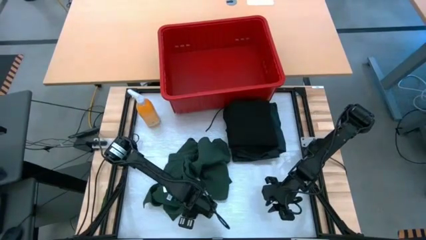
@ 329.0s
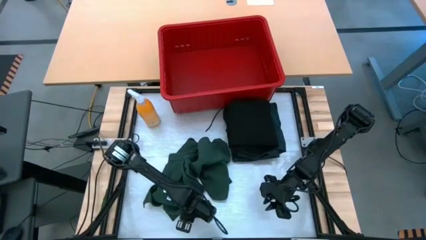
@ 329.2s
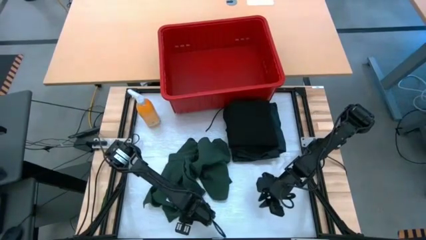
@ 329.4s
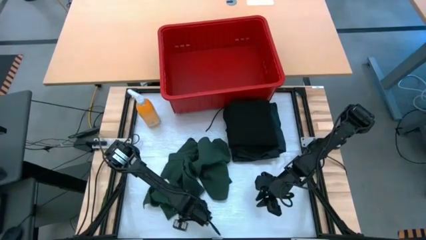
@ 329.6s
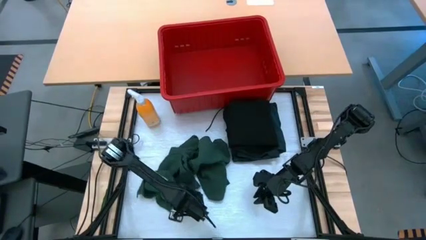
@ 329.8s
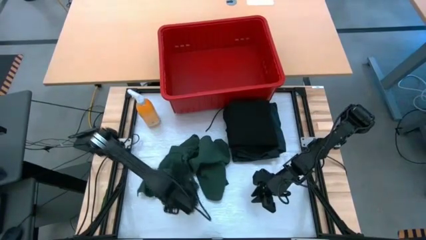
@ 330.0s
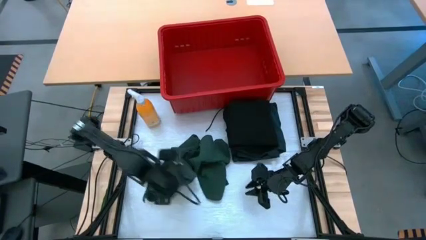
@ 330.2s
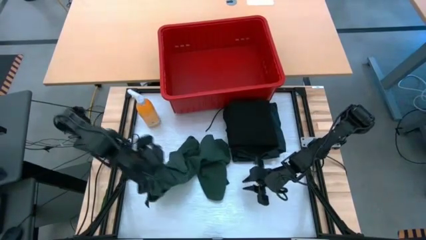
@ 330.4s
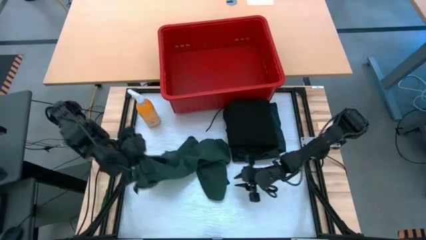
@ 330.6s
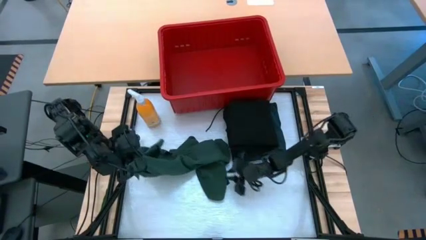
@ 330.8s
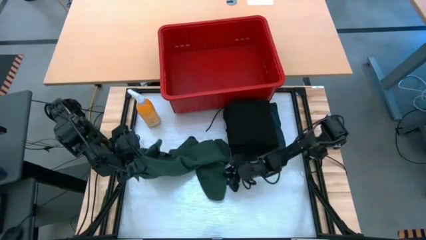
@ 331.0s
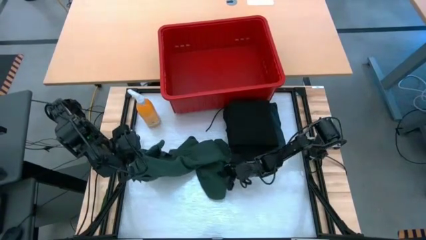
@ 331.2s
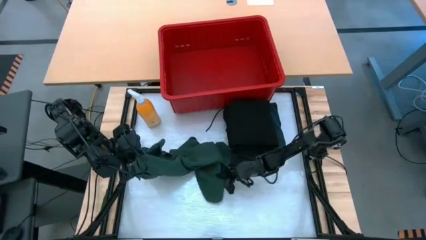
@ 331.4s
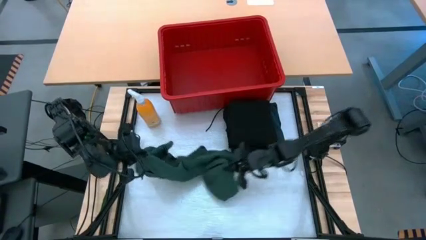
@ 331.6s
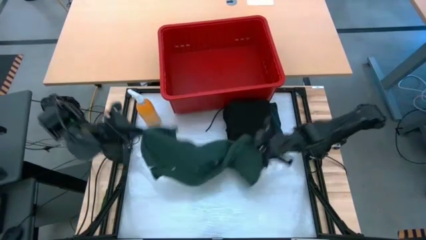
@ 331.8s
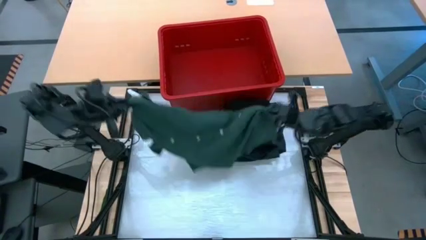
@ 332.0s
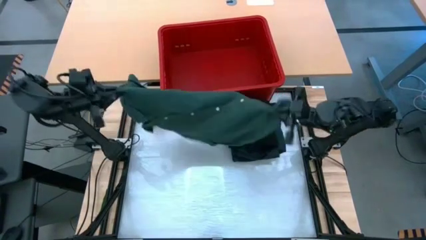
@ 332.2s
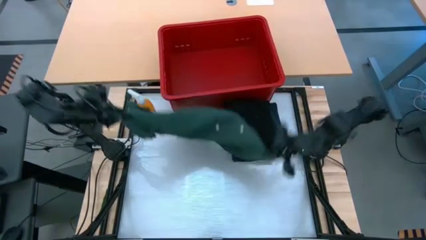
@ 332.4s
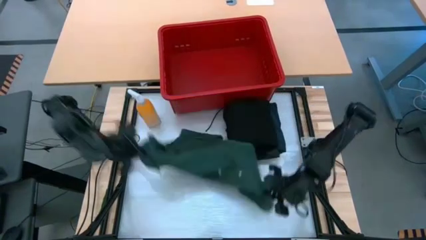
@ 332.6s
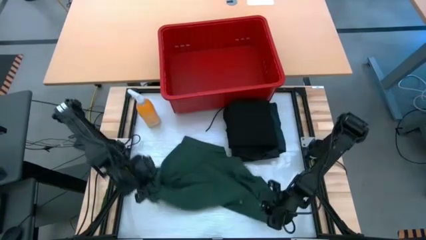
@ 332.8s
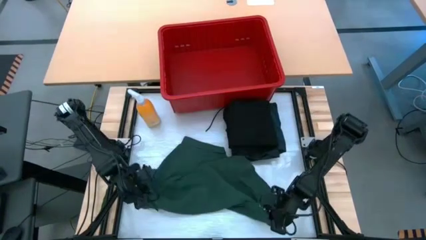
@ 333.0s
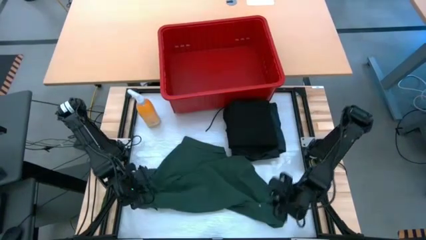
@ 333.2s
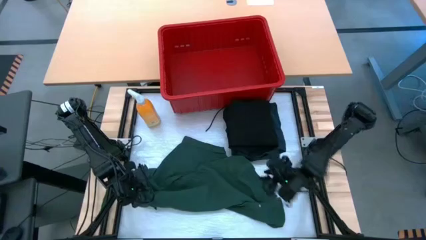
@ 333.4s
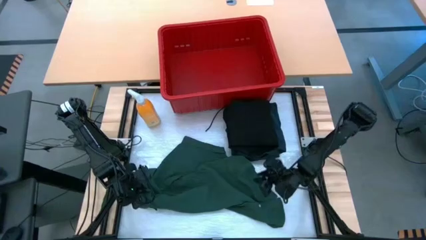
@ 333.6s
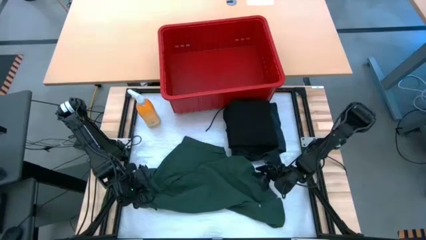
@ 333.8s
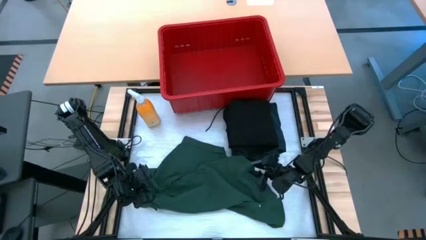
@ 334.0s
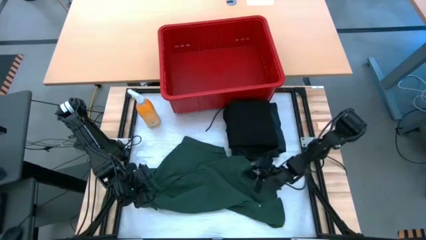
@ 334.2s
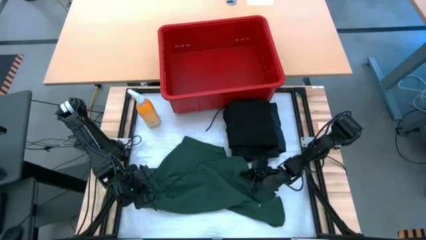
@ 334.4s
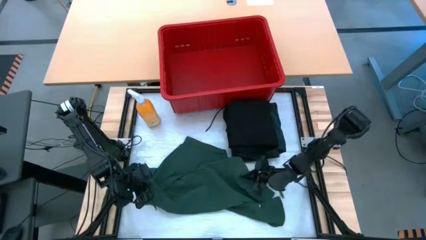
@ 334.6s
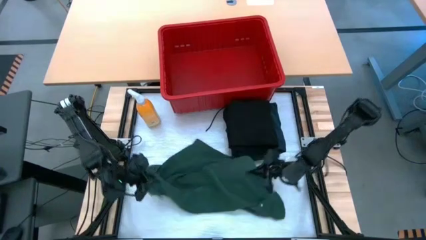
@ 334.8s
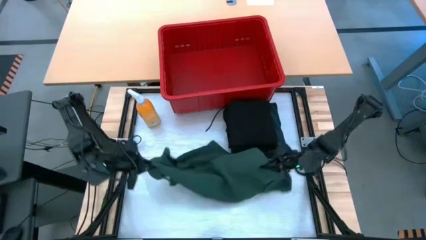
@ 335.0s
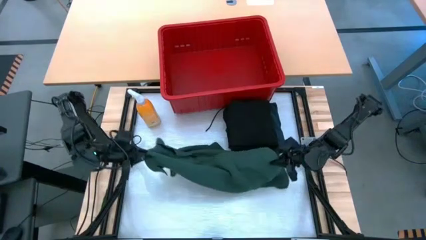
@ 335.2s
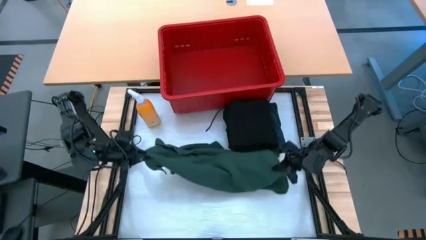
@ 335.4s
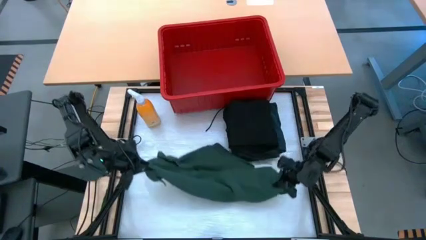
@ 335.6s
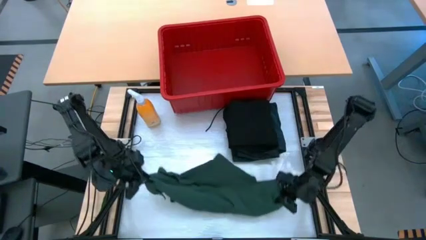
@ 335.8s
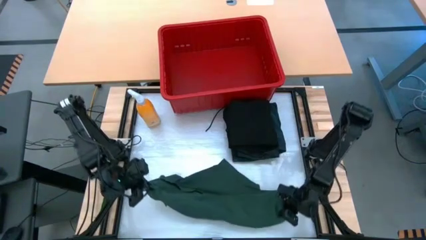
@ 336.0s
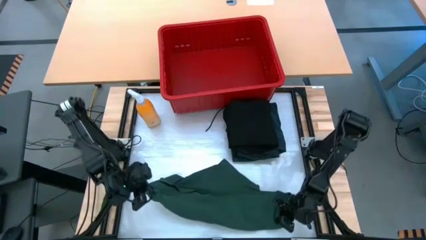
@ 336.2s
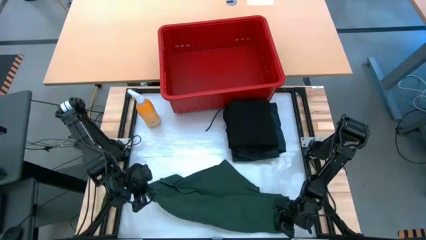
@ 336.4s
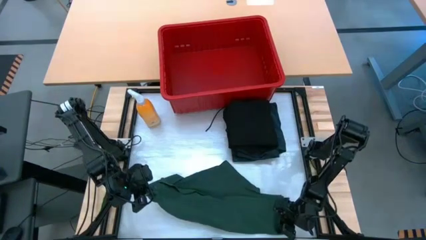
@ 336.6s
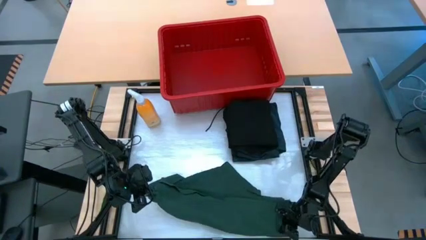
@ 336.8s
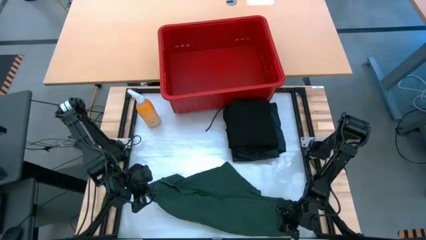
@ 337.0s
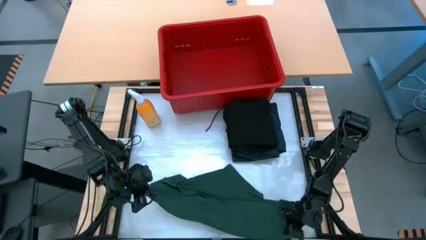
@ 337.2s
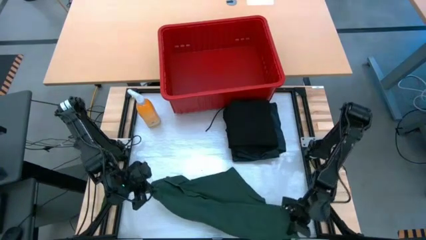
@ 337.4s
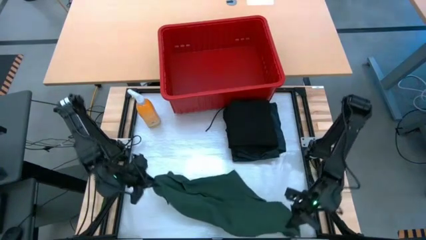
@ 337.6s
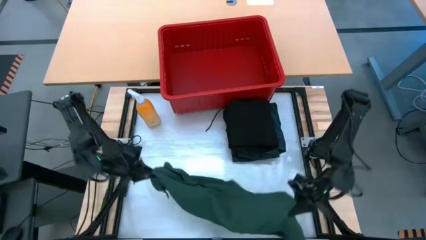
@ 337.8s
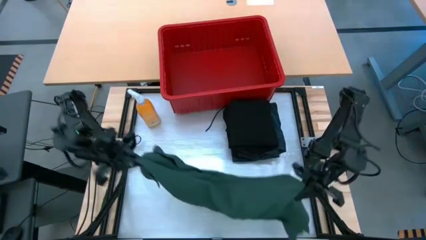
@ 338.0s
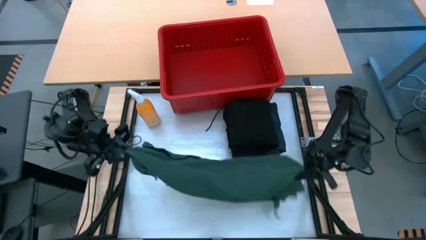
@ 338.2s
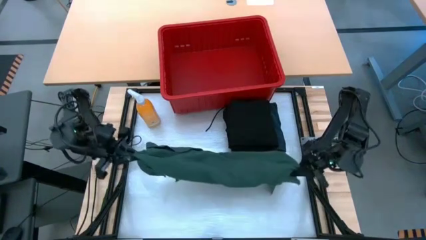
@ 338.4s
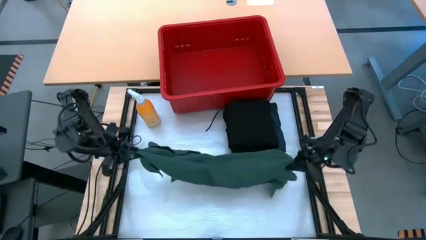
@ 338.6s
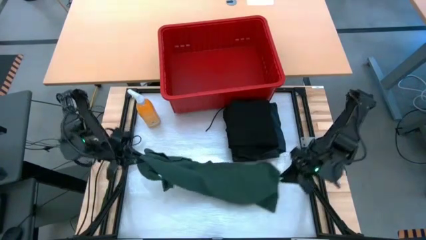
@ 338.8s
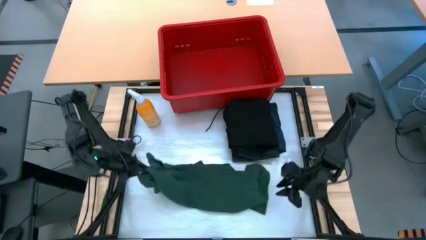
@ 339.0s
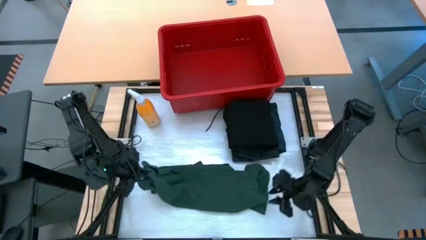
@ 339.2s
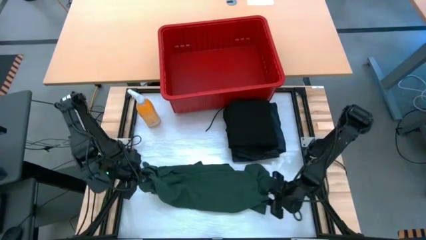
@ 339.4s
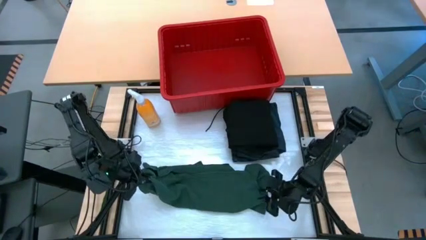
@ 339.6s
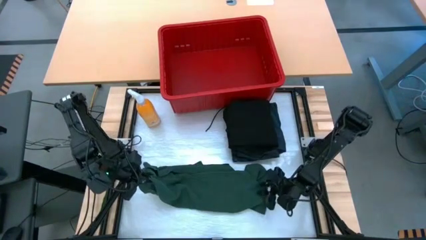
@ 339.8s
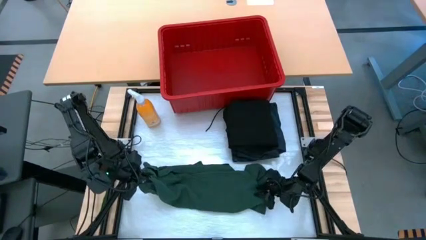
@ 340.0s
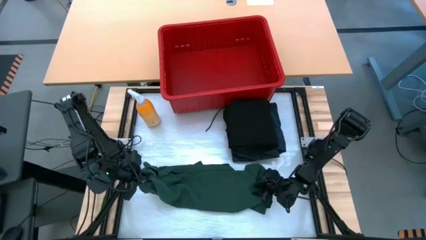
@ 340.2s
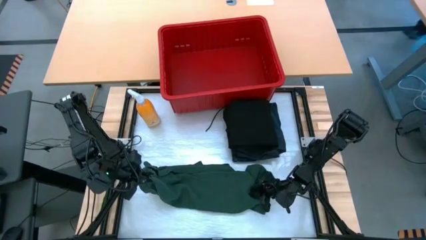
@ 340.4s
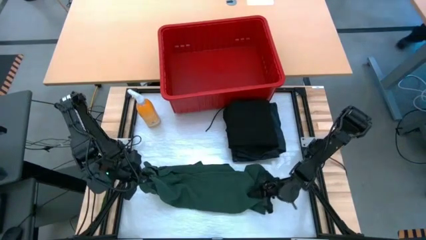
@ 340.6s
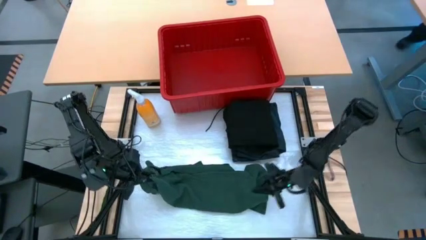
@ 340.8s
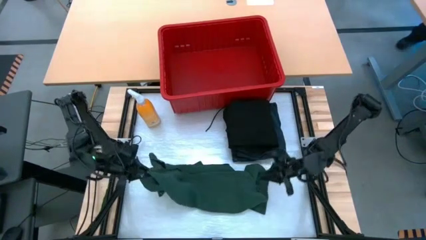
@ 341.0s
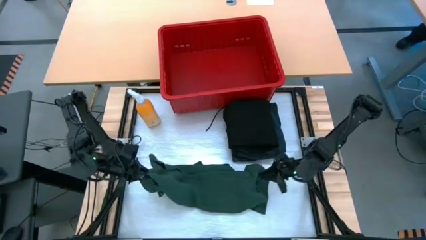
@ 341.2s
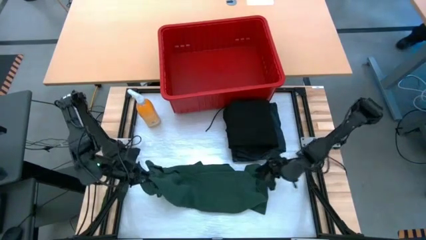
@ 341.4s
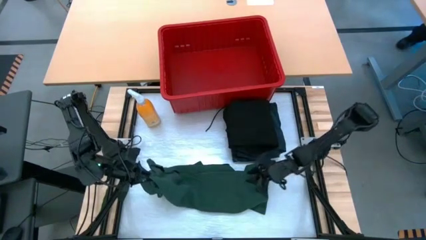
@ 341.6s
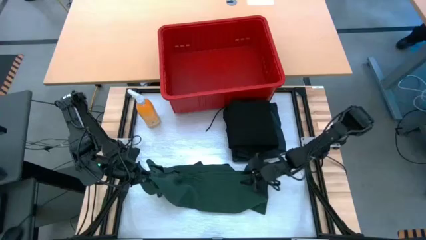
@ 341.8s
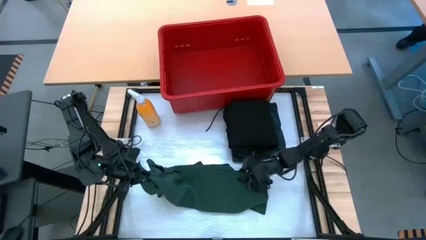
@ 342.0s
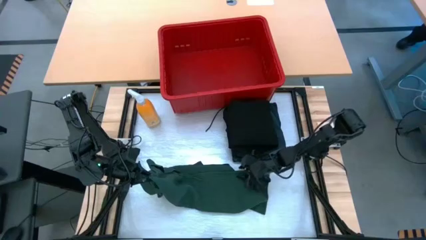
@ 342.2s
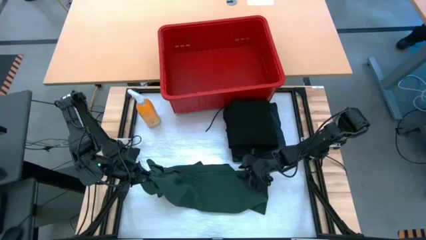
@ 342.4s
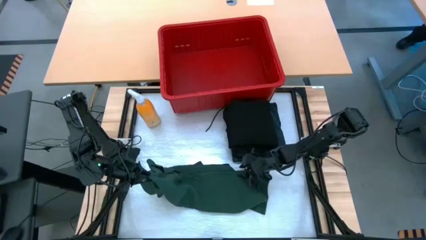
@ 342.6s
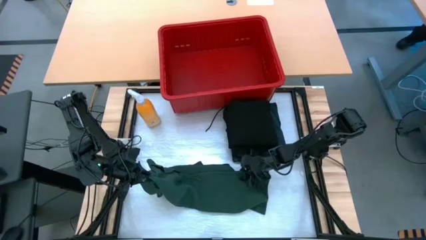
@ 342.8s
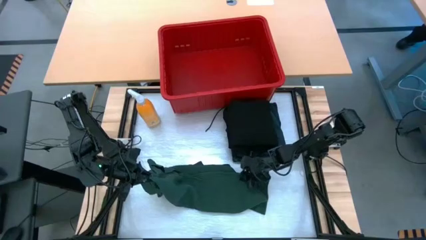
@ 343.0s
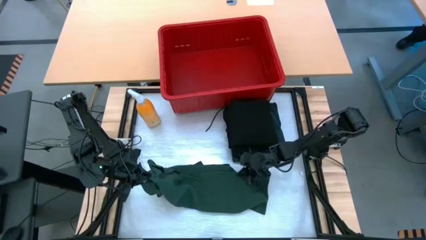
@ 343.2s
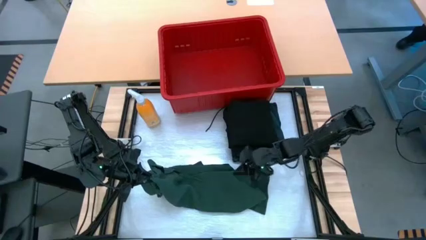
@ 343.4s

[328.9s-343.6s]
Task: Fold Laundry from Bin
Fold the green polo shirt
